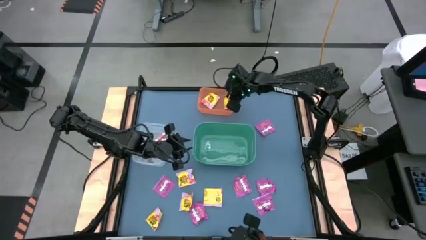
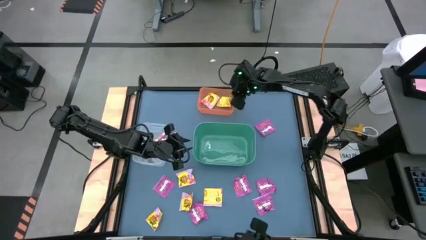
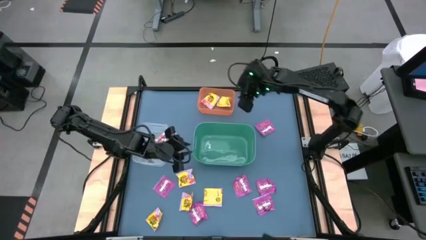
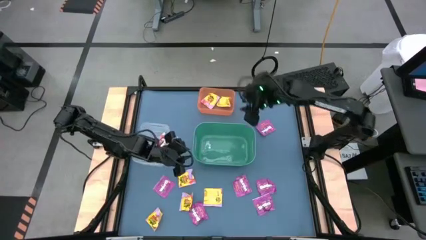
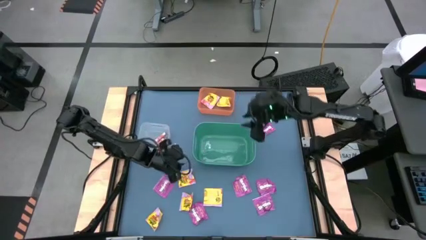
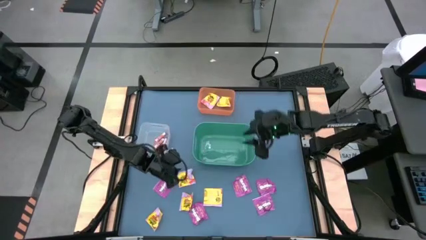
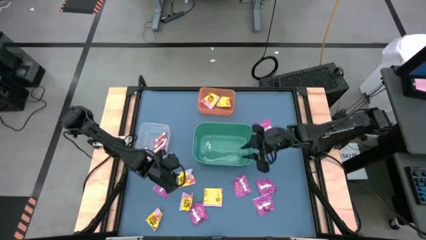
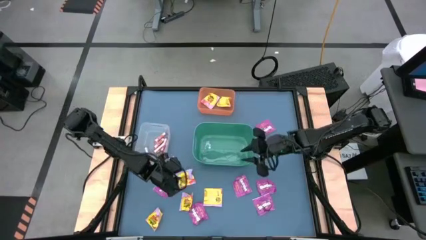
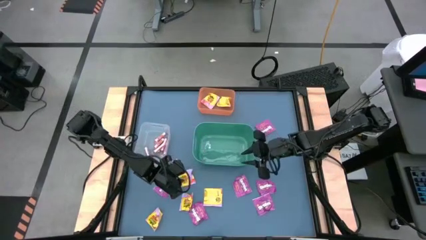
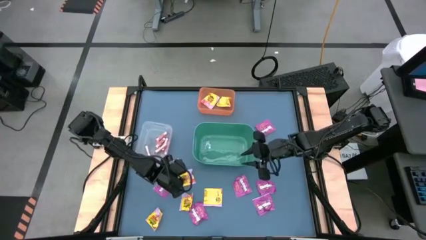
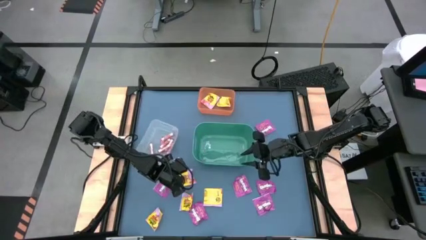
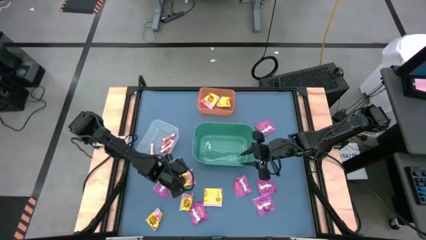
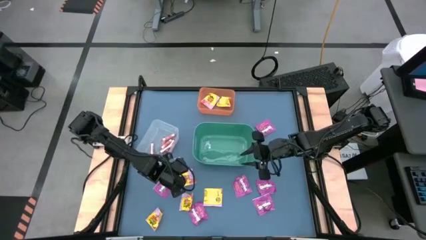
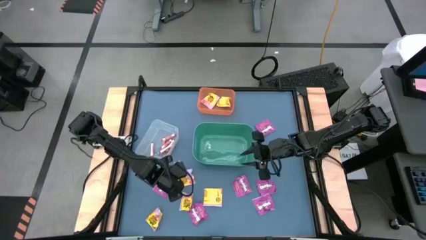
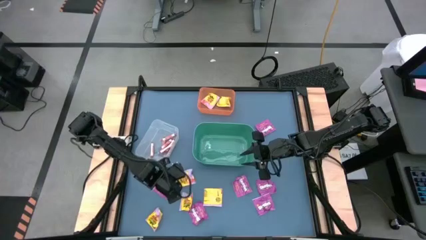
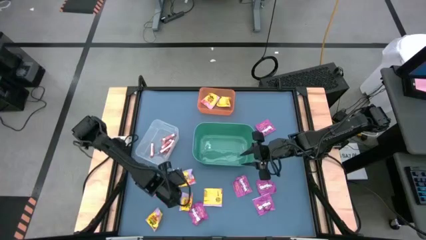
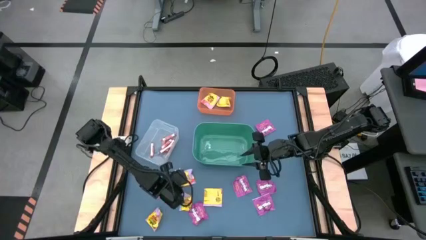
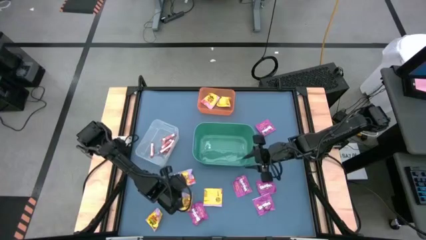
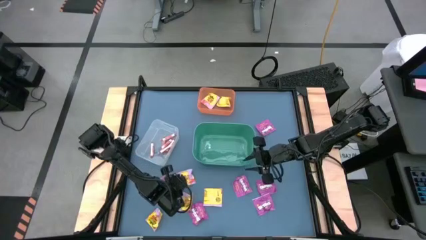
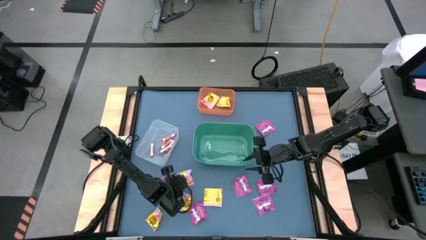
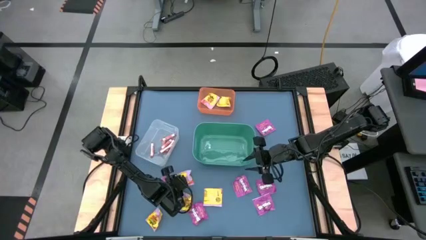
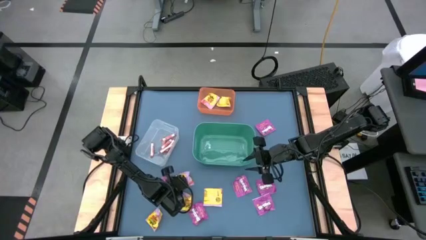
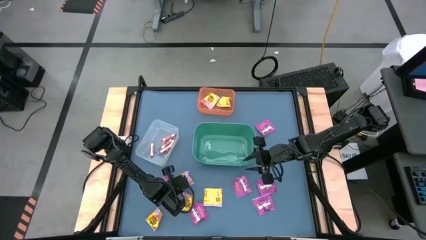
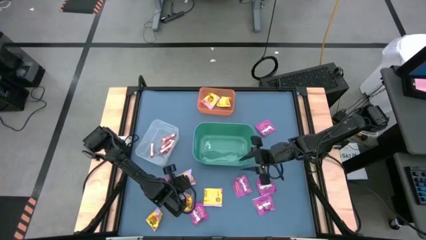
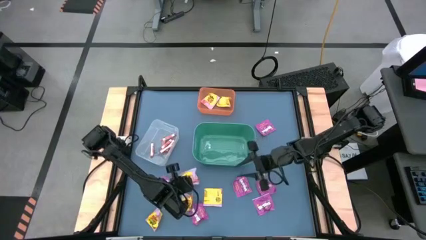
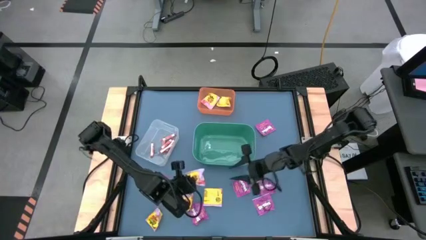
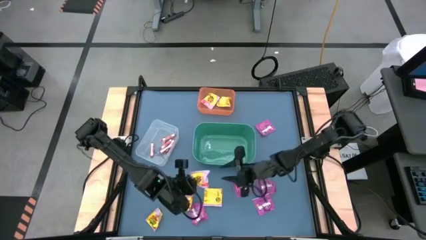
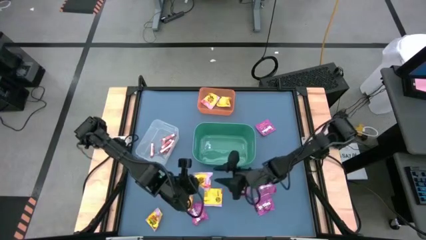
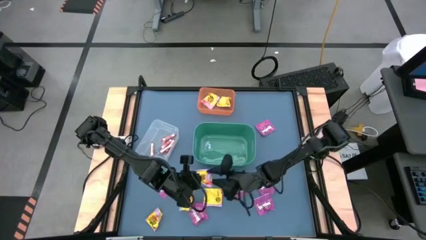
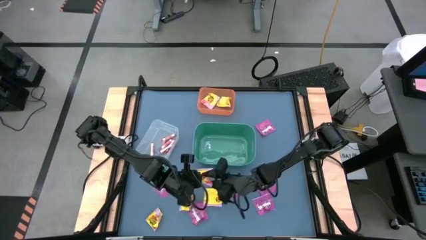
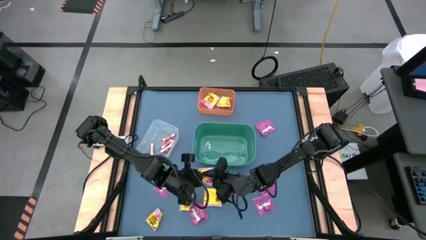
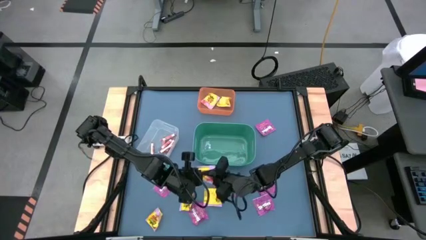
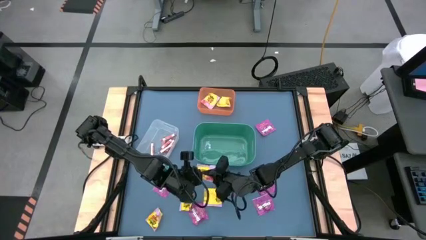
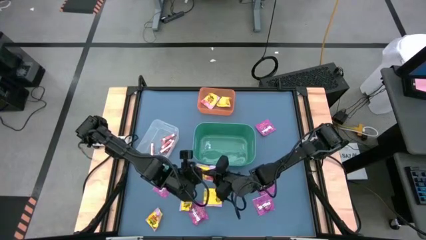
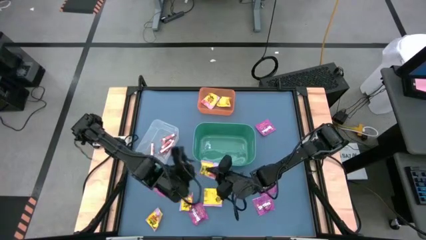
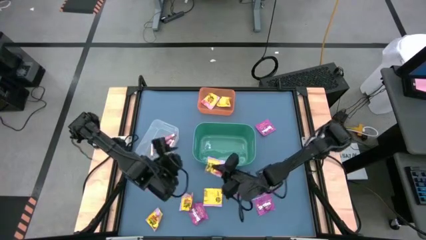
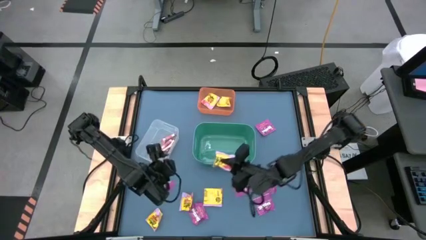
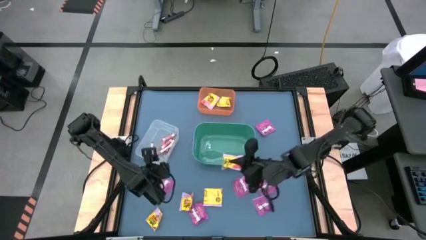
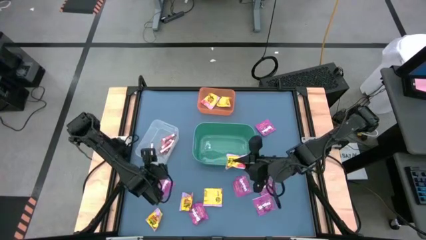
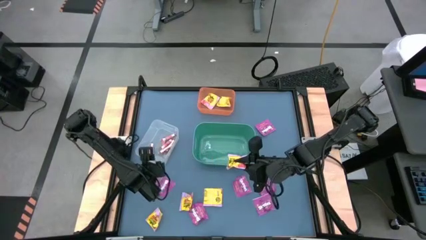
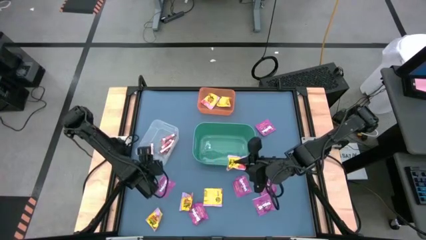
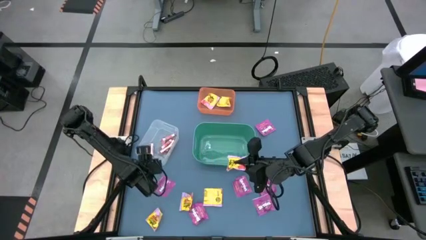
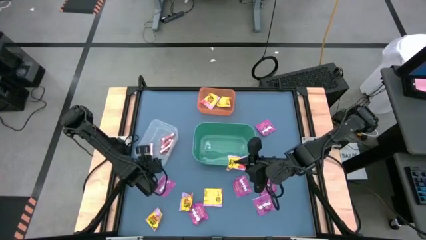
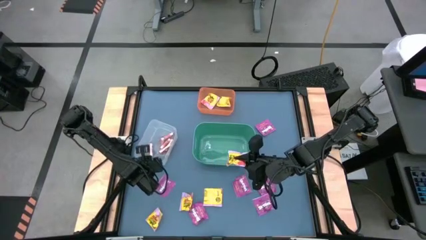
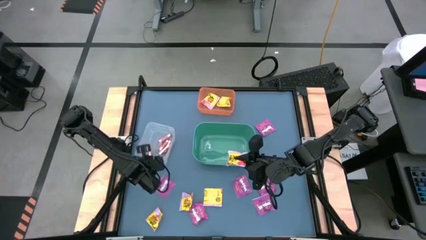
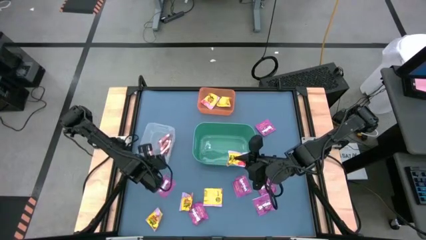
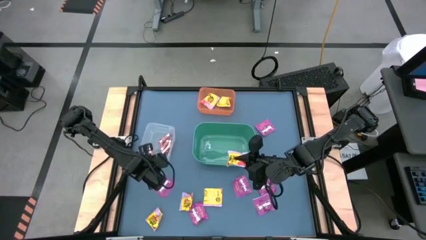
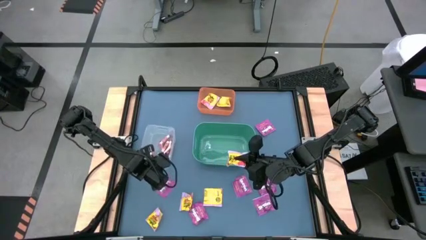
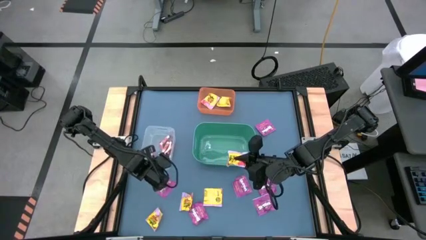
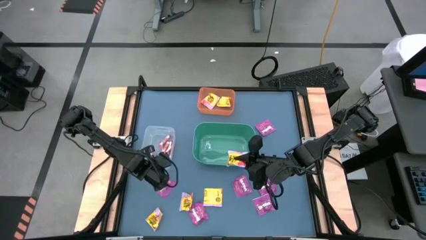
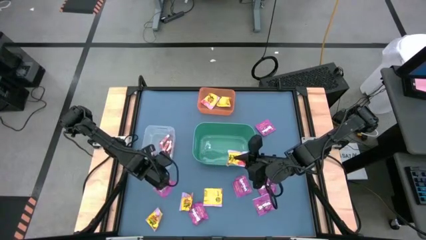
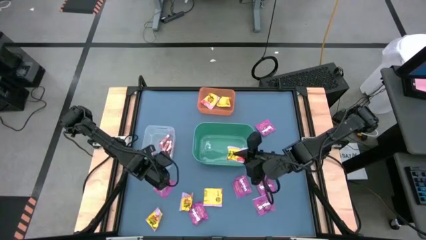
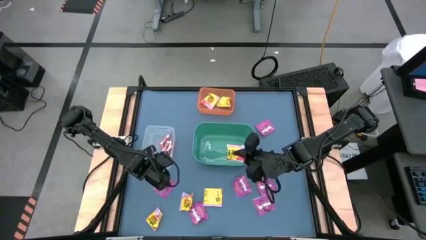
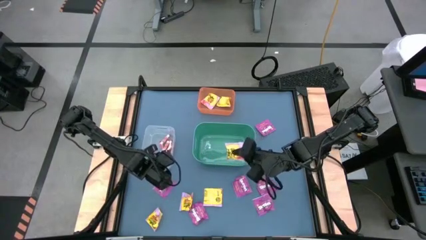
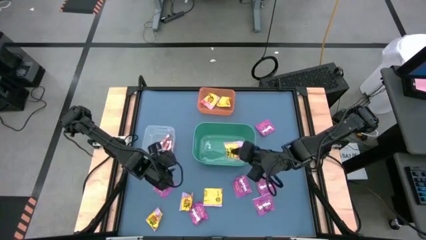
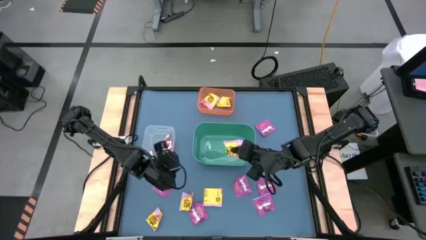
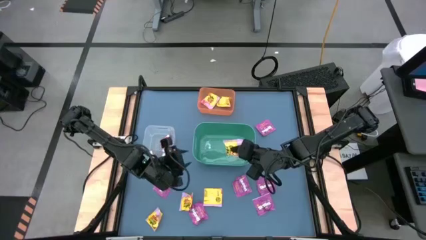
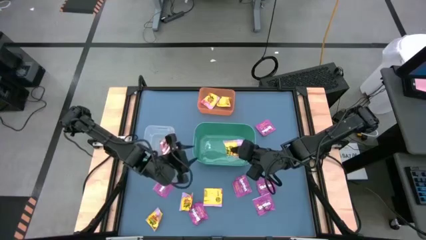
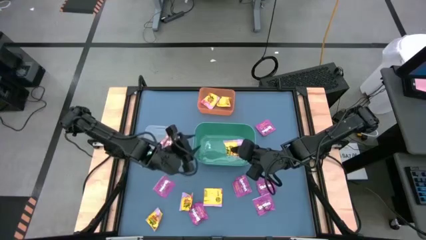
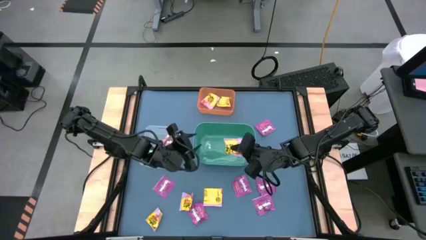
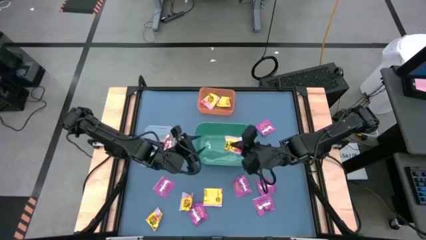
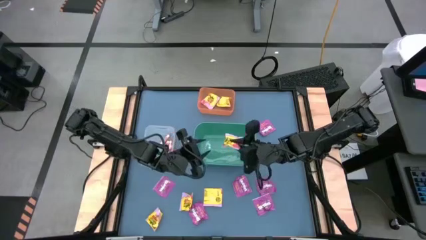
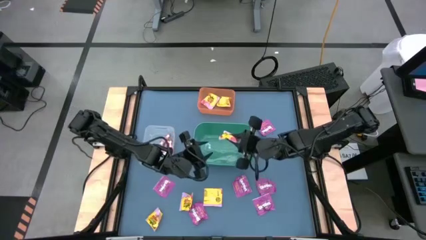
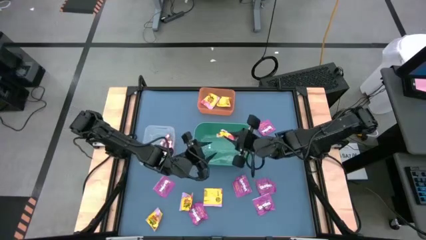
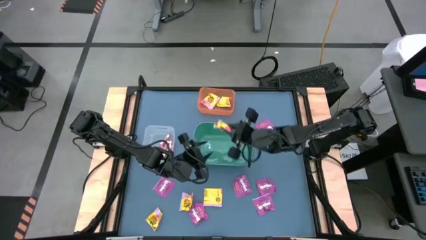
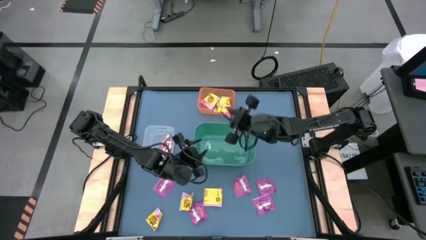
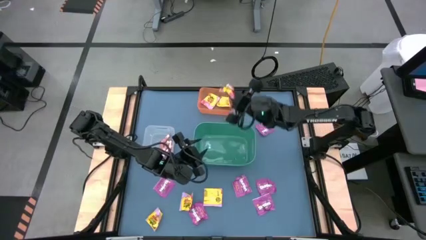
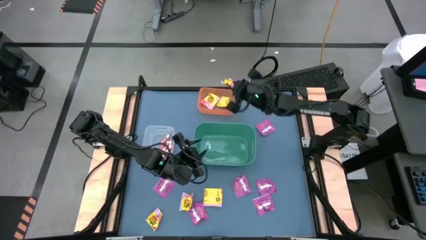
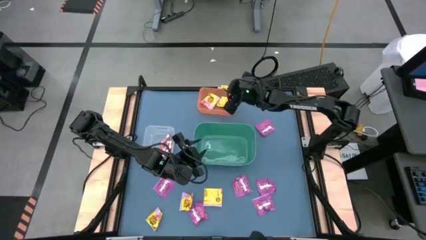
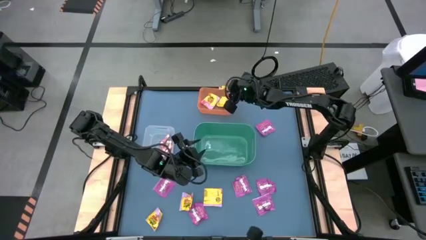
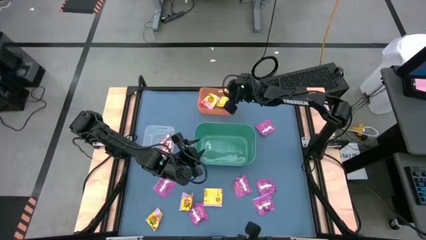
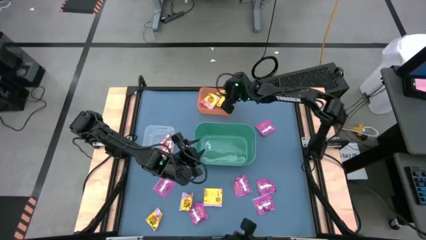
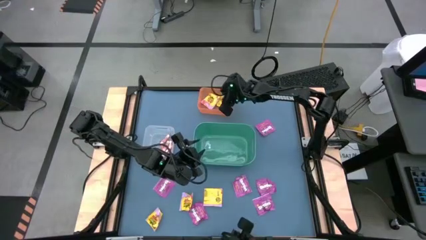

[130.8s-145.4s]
Task: Sort candy
Put the yellow candy into the orange bin

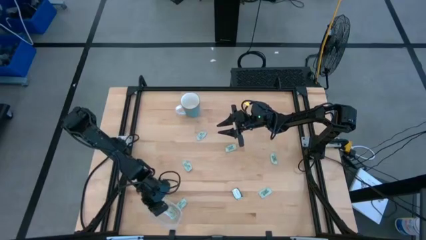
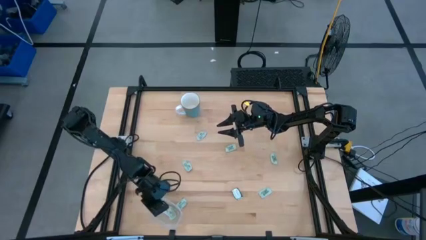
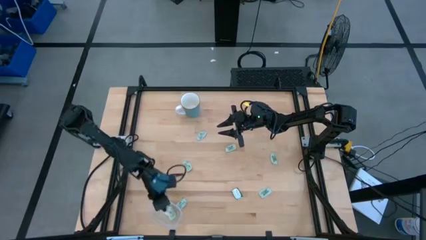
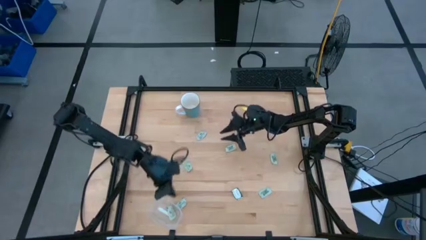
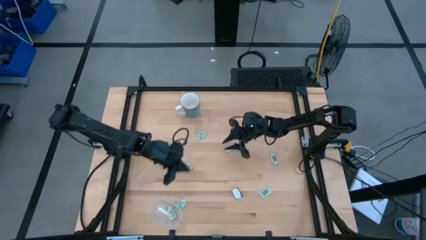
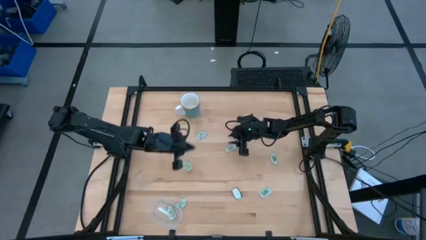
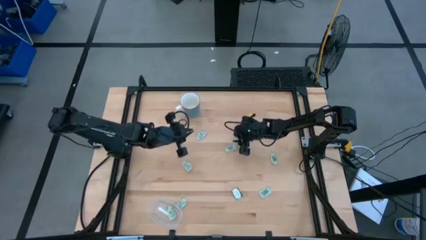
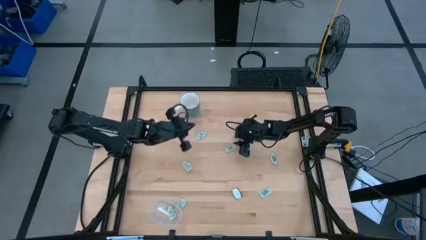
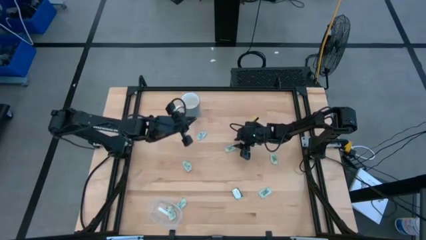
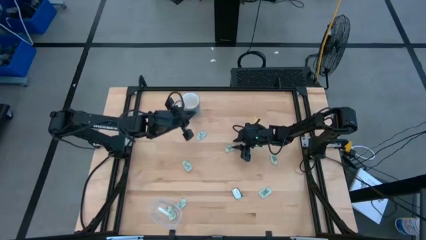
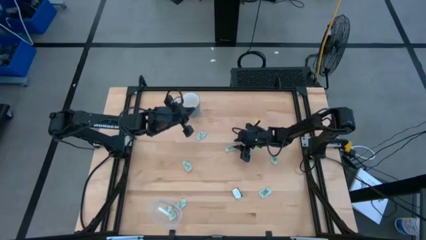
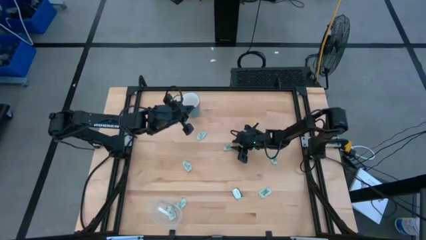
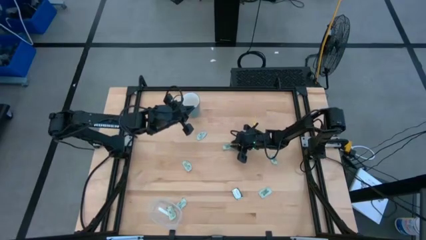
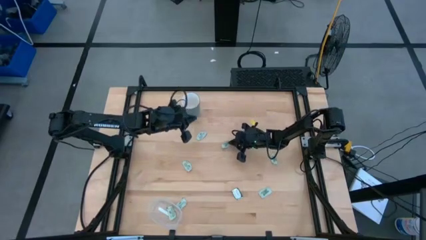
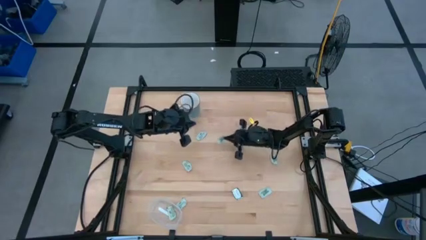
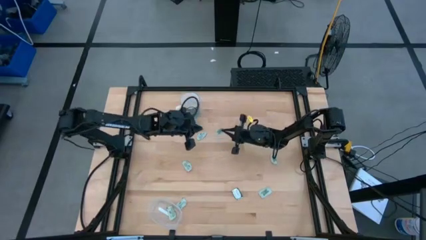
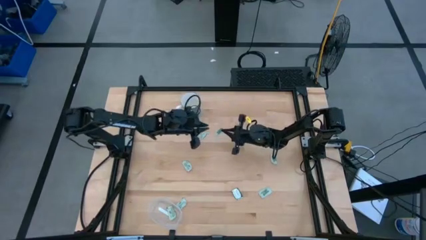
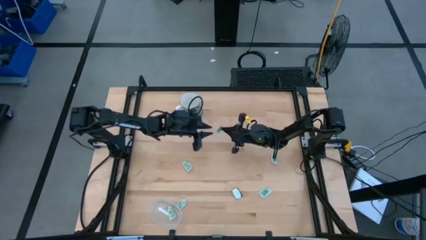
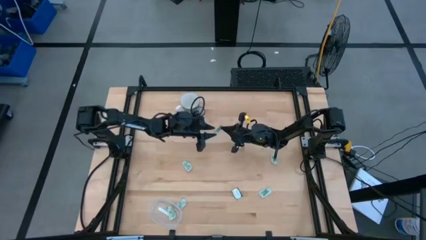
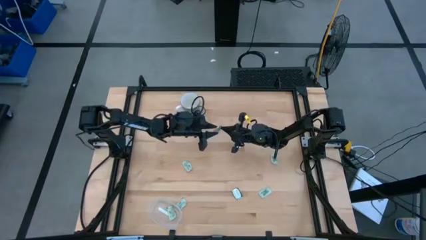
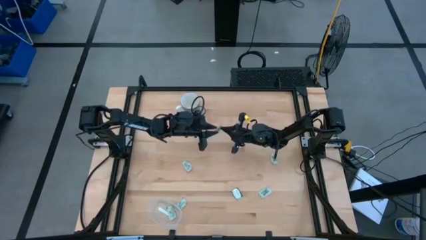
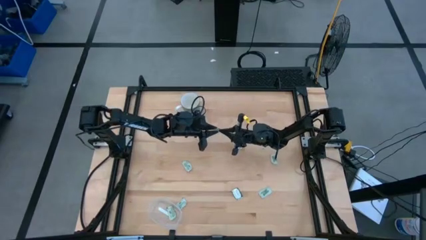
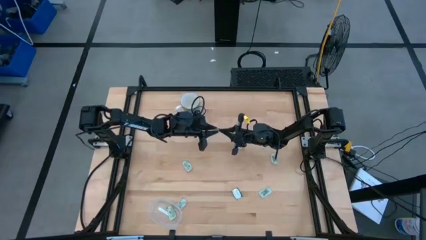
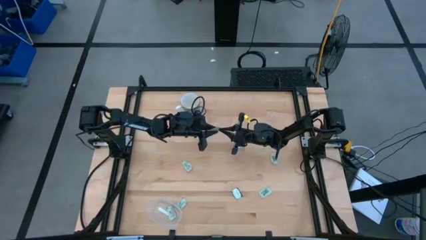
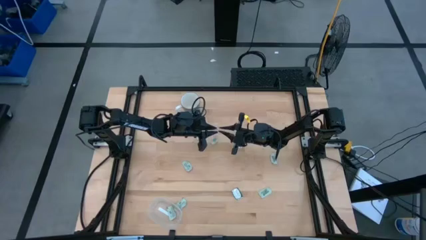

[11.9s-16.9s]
Task: Pick and place Stevia / Truvia into bins
Put the stevia packet into the transparent container
